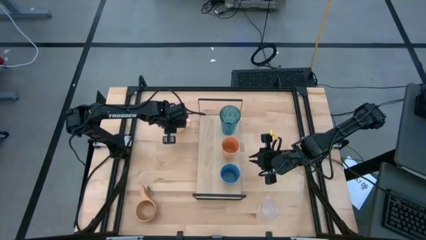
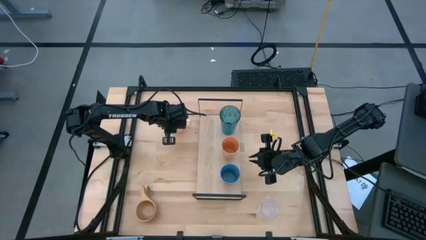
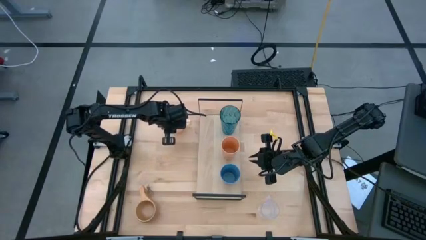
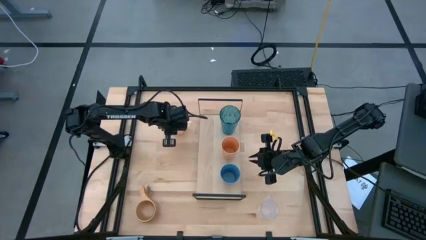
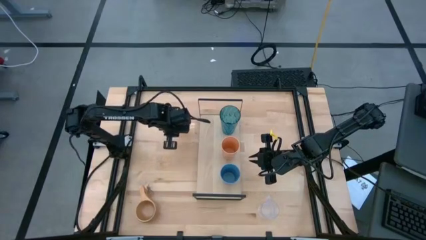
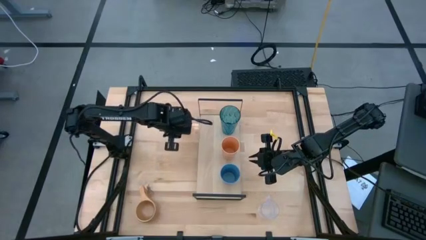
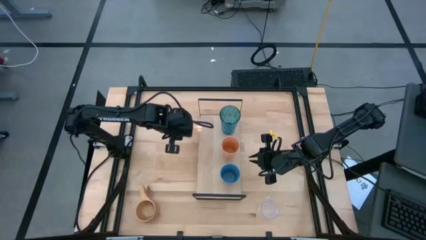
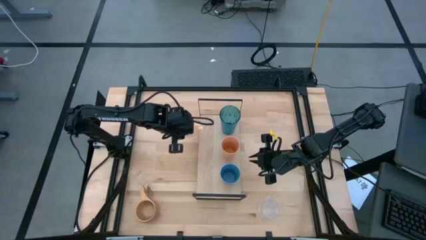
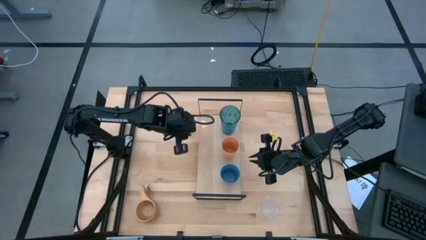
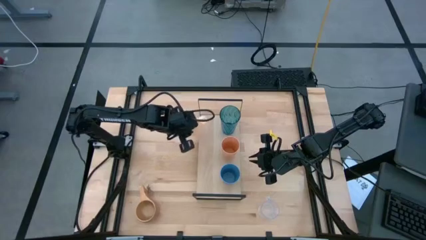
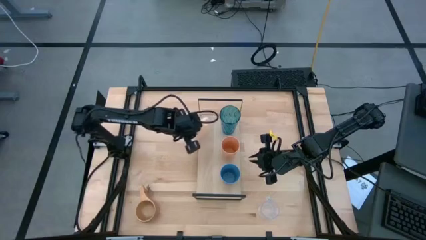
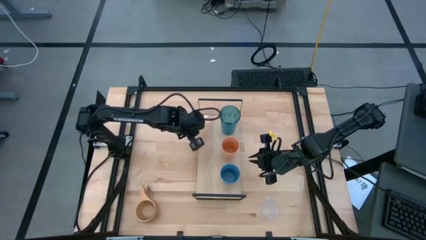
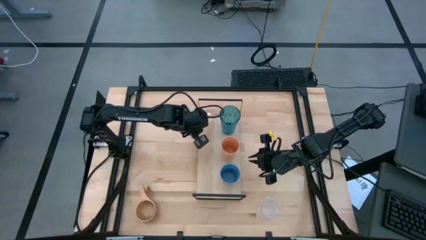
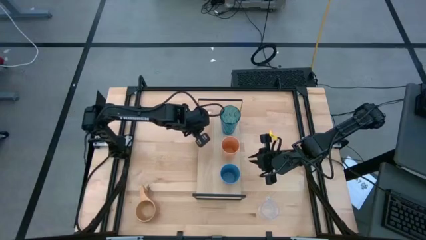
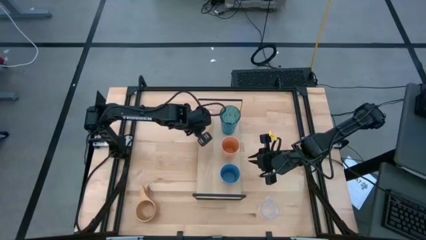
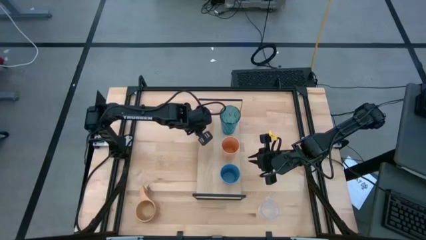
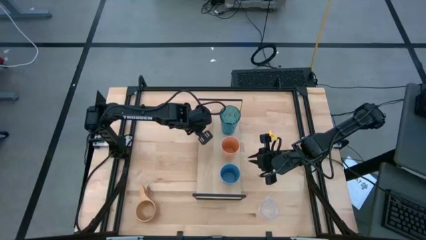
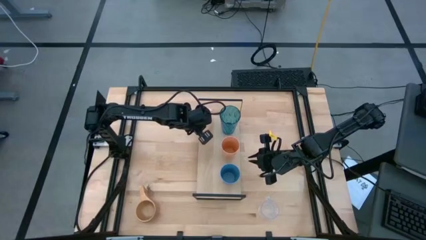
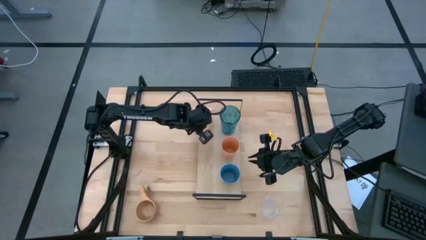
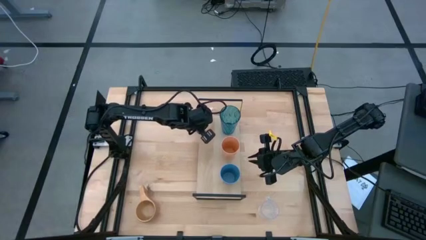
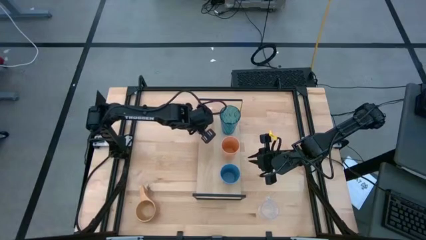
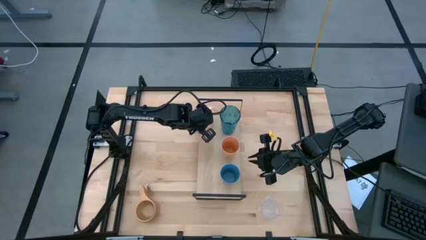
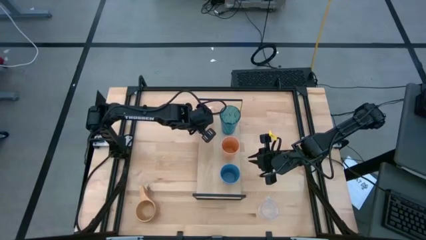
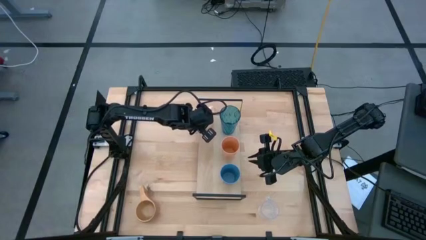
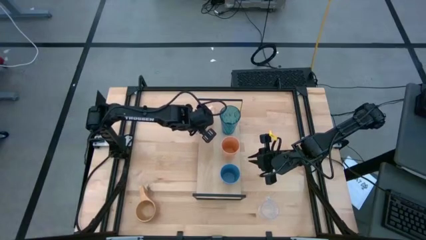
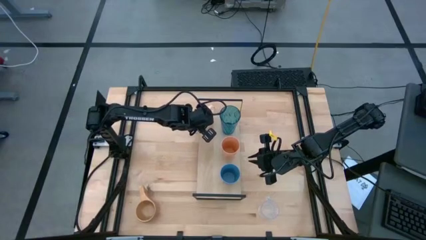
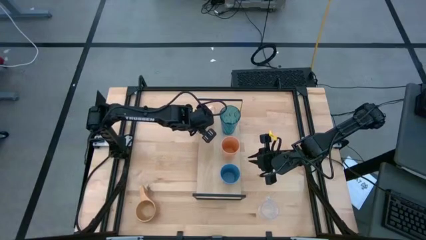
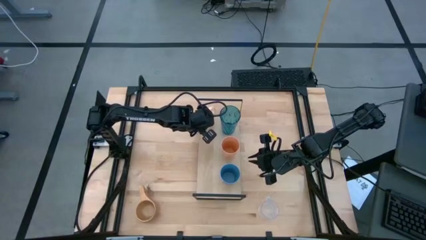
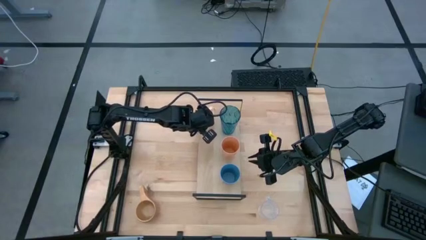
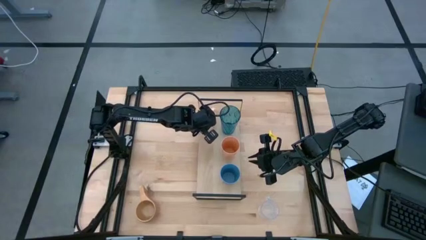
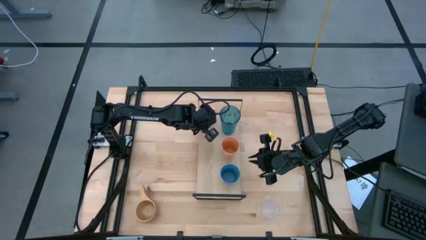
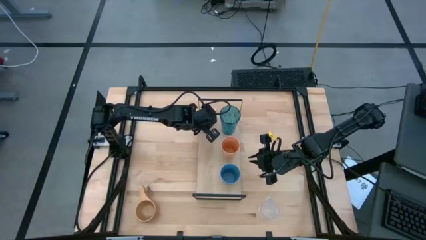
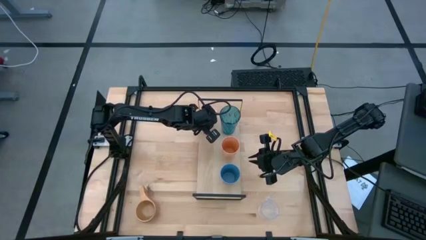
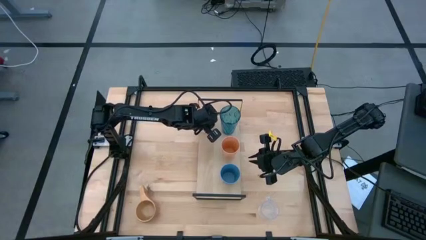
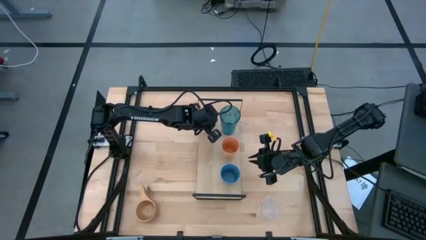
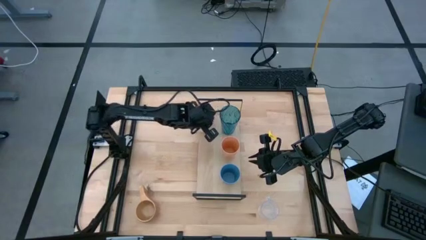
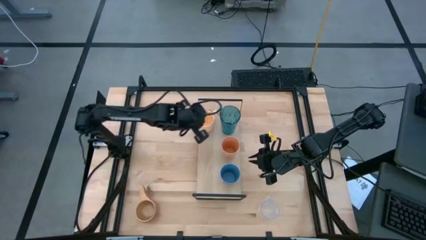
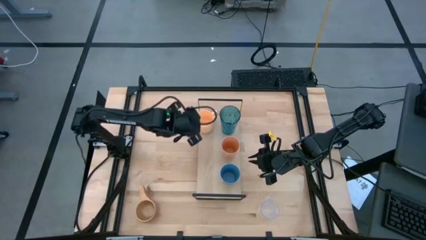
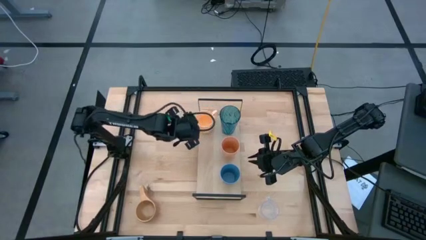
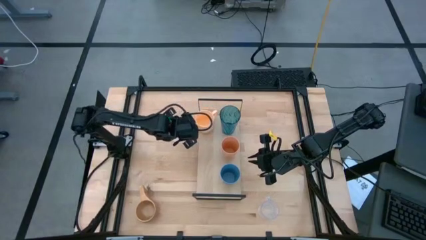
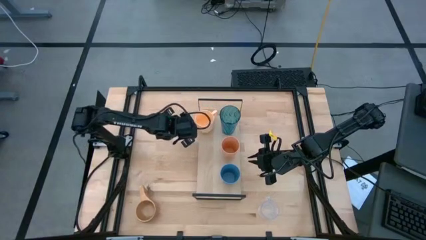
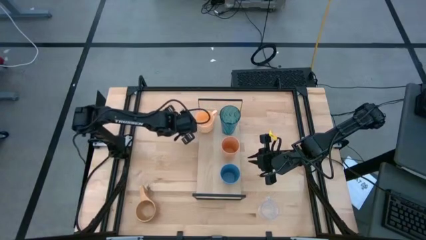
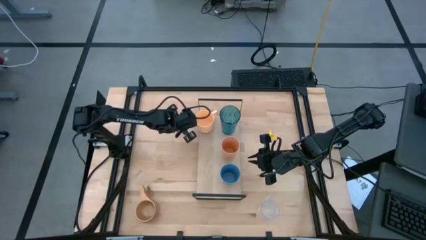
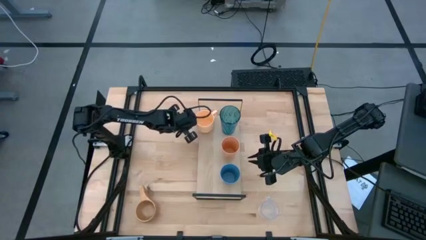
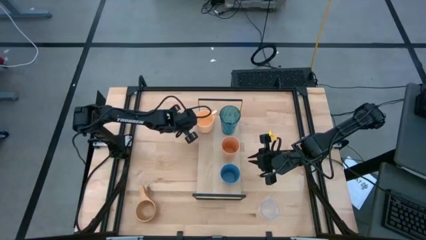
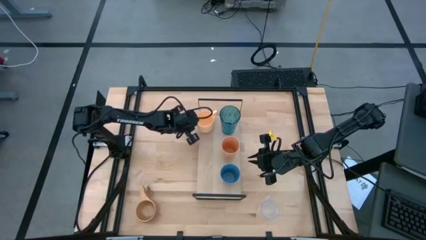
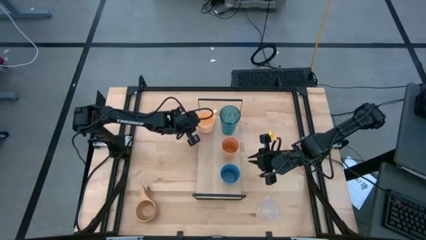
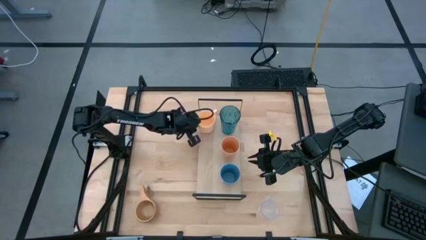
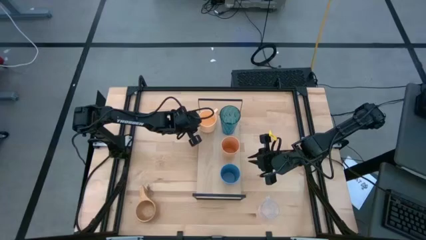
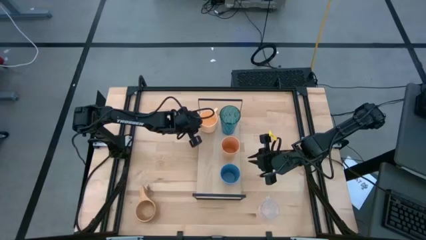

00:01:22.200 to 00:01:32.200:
Task: Stack small to large cups/mugs on shelf
Put the light orange mug on the shelf
